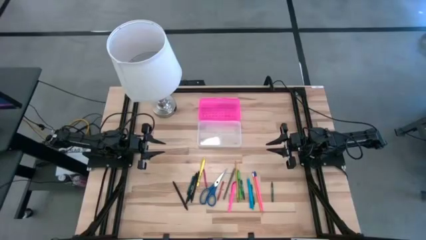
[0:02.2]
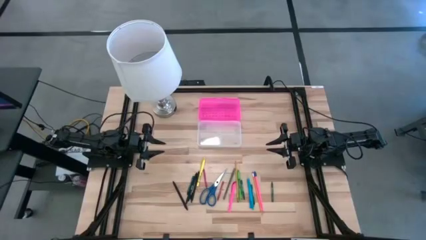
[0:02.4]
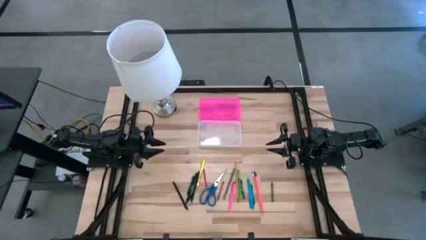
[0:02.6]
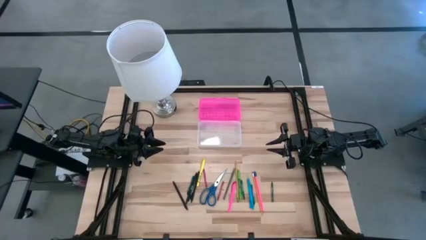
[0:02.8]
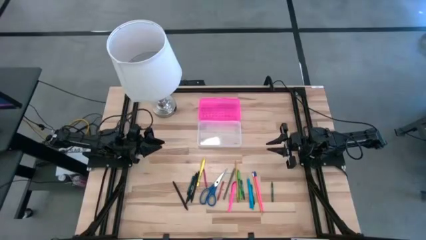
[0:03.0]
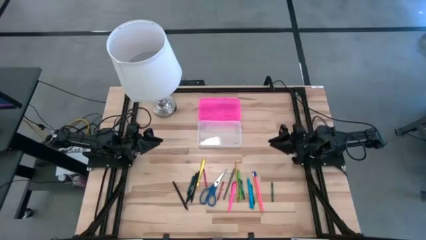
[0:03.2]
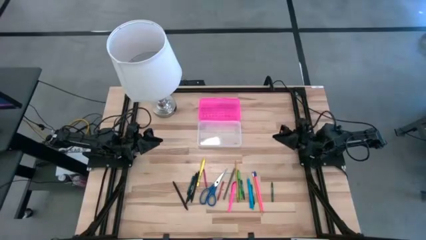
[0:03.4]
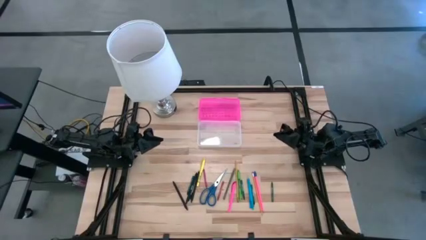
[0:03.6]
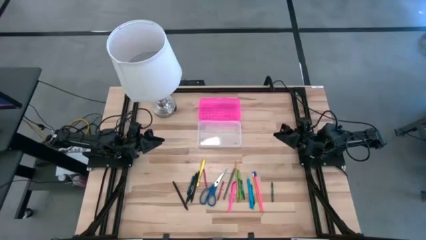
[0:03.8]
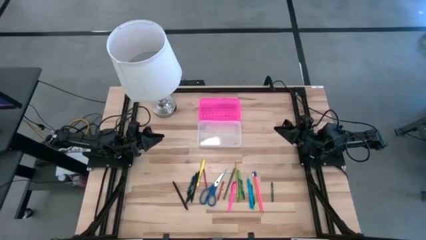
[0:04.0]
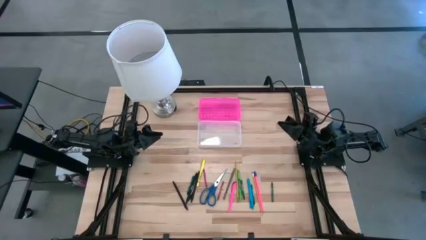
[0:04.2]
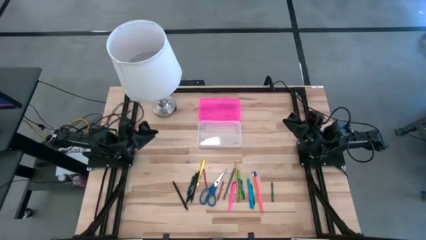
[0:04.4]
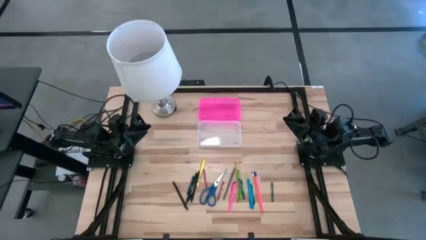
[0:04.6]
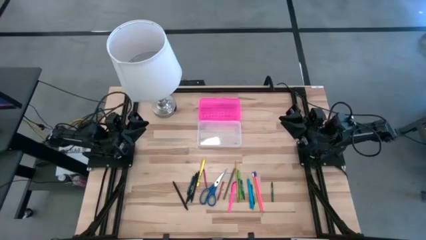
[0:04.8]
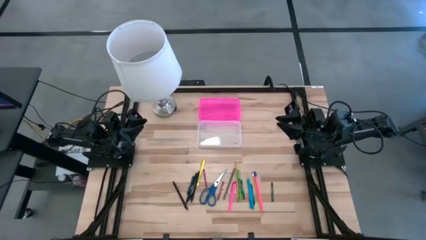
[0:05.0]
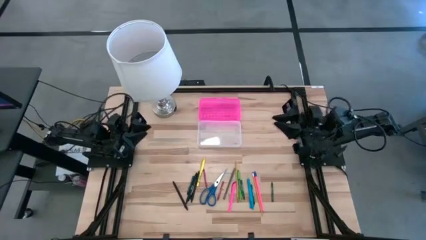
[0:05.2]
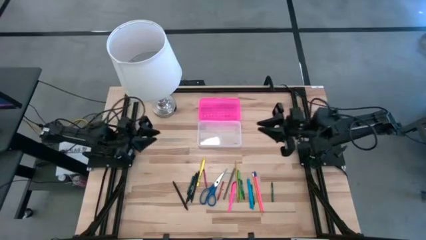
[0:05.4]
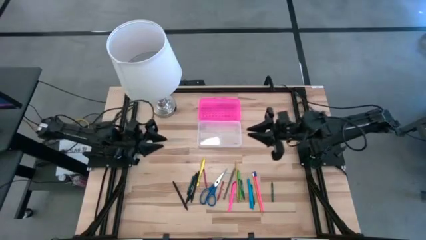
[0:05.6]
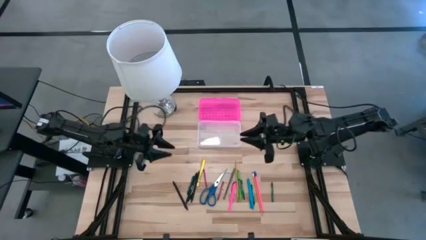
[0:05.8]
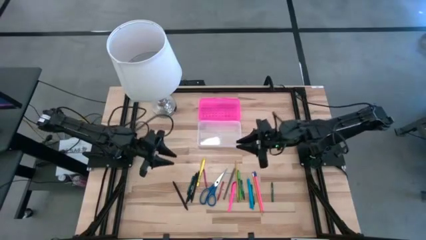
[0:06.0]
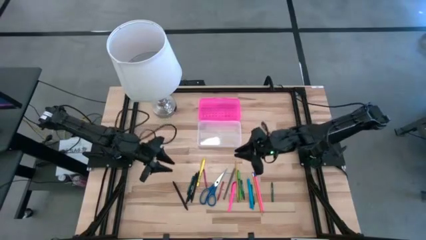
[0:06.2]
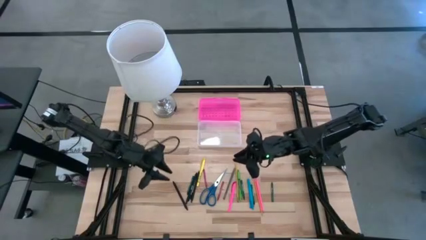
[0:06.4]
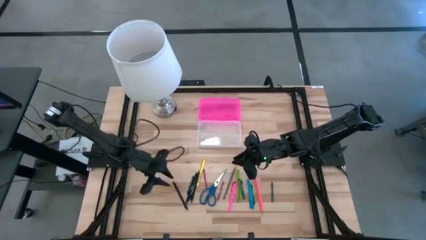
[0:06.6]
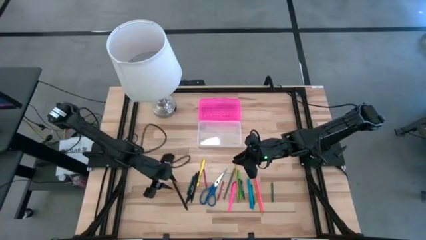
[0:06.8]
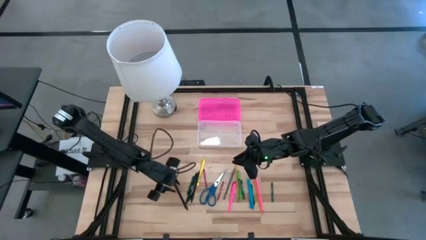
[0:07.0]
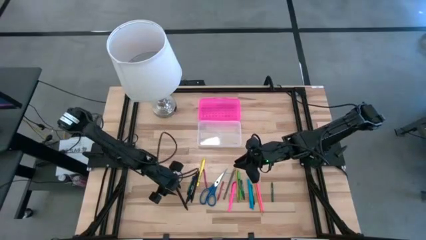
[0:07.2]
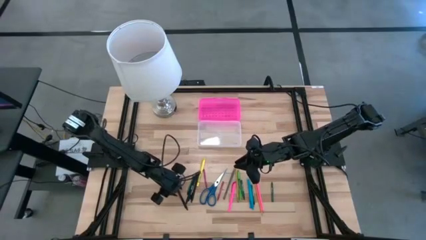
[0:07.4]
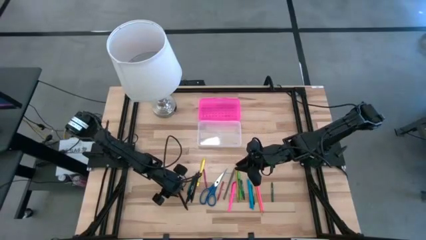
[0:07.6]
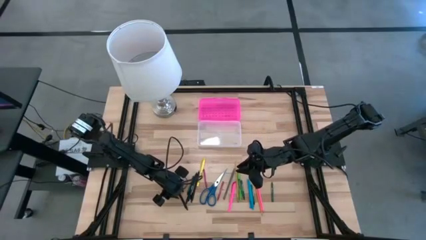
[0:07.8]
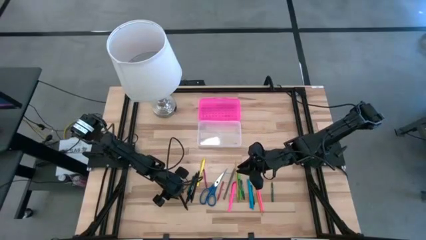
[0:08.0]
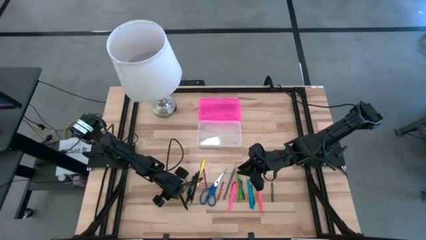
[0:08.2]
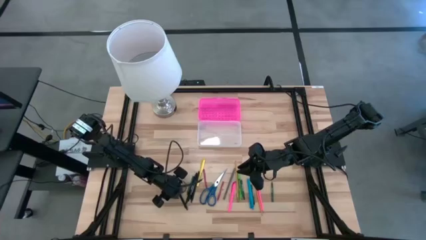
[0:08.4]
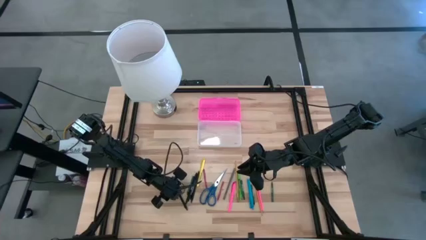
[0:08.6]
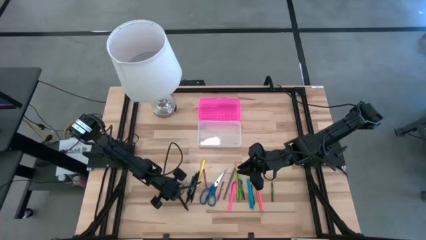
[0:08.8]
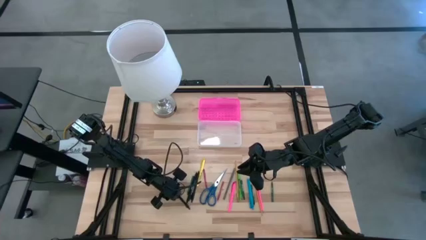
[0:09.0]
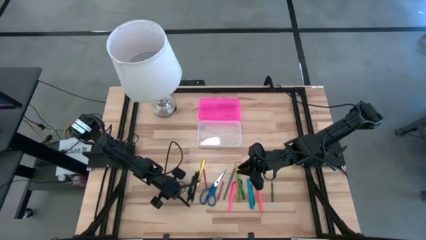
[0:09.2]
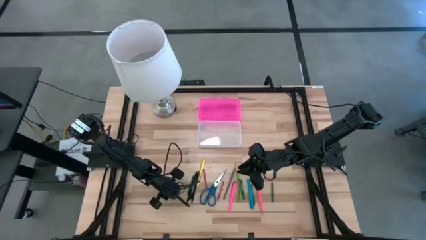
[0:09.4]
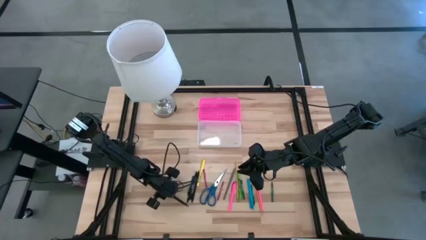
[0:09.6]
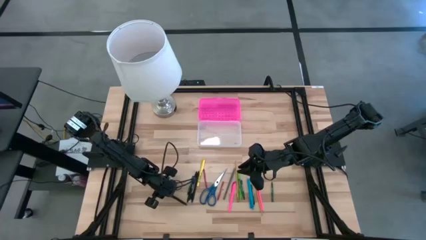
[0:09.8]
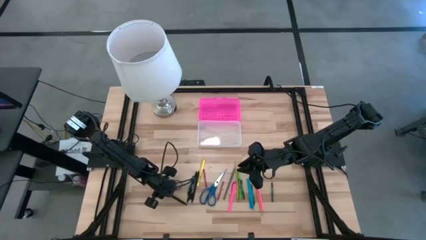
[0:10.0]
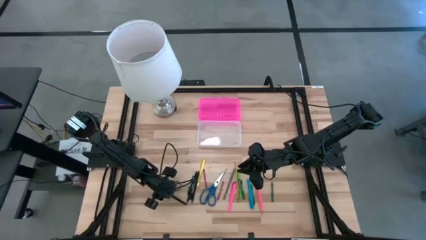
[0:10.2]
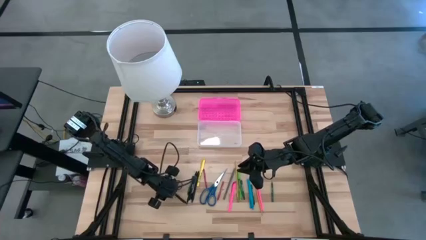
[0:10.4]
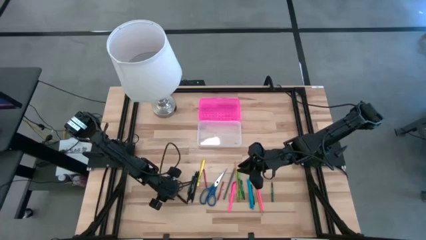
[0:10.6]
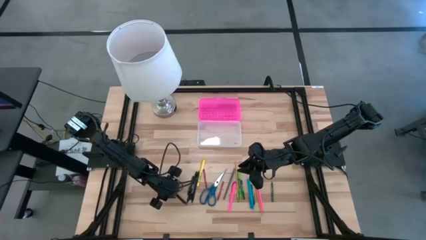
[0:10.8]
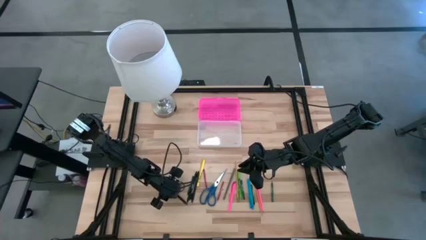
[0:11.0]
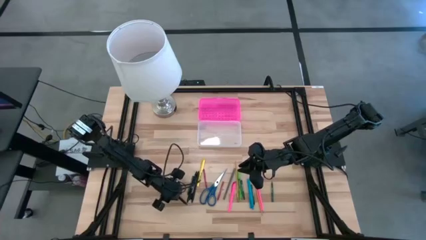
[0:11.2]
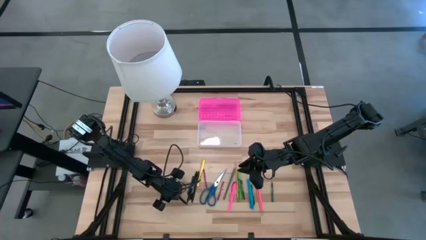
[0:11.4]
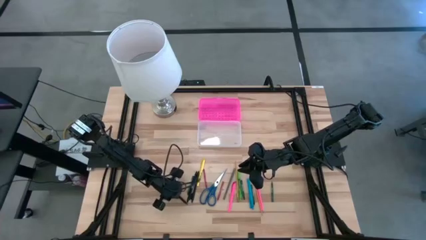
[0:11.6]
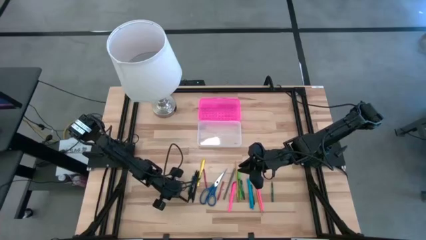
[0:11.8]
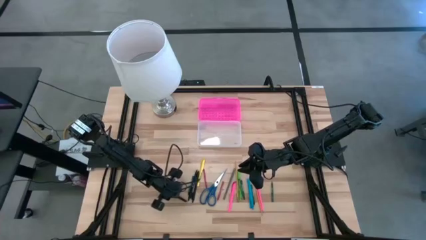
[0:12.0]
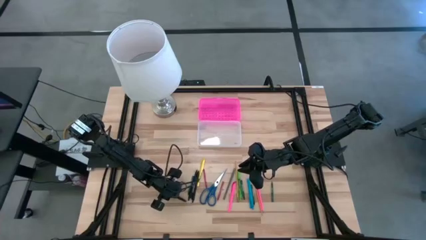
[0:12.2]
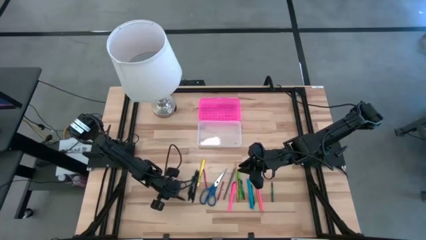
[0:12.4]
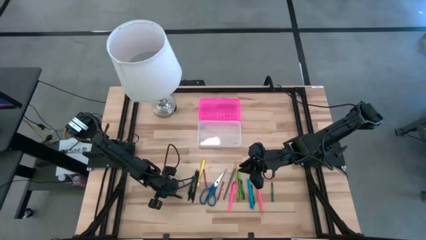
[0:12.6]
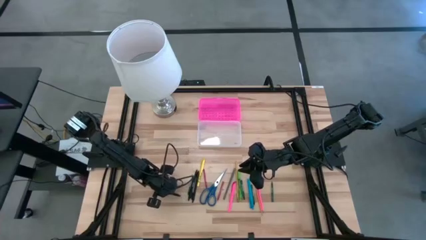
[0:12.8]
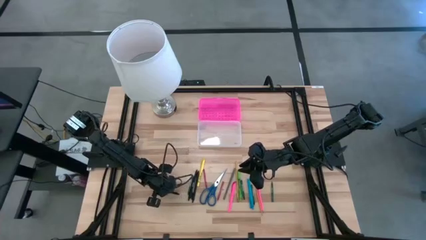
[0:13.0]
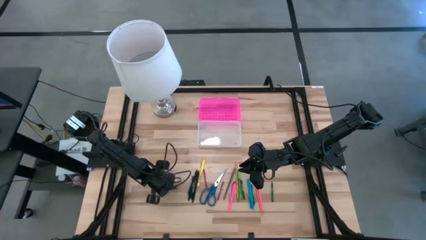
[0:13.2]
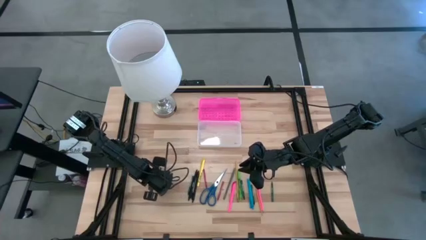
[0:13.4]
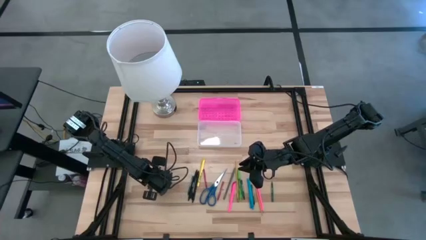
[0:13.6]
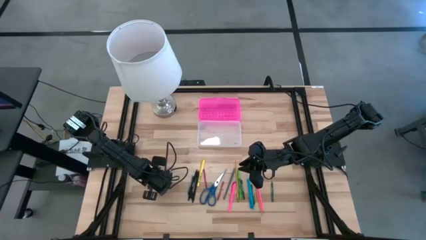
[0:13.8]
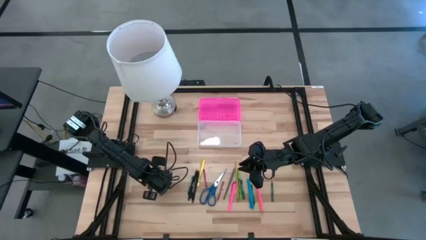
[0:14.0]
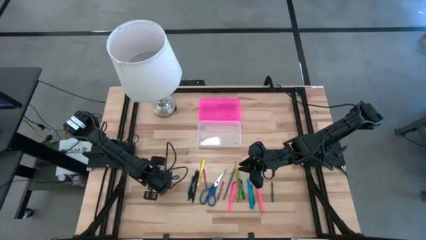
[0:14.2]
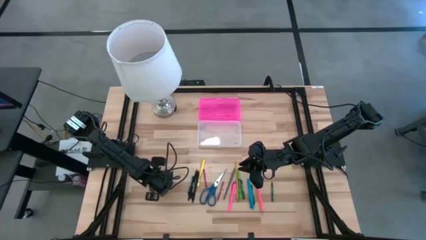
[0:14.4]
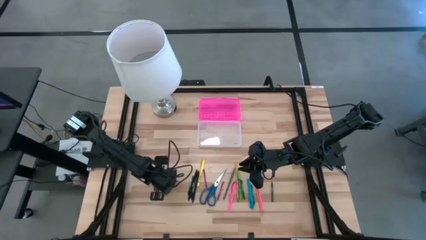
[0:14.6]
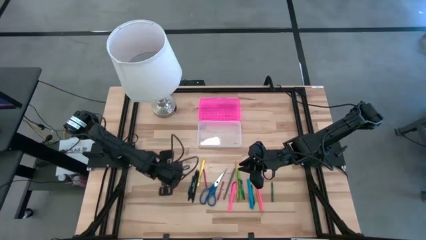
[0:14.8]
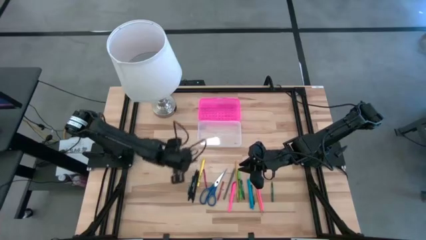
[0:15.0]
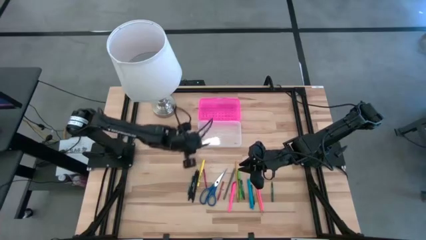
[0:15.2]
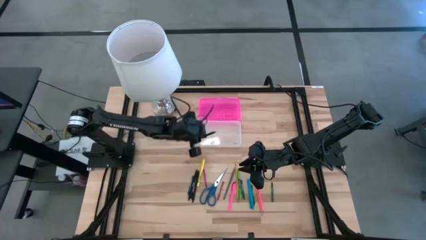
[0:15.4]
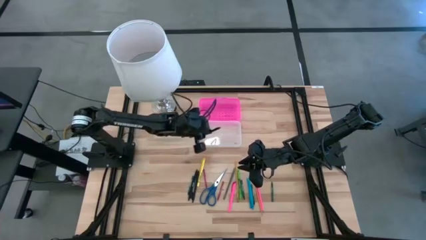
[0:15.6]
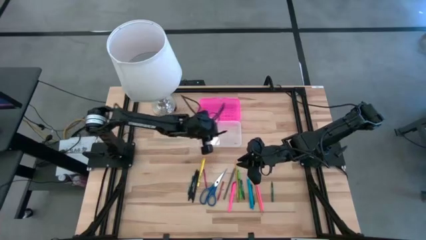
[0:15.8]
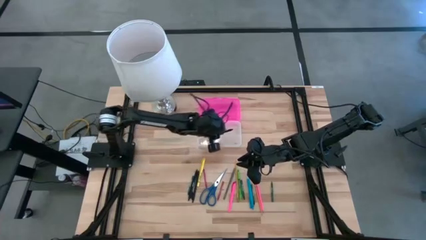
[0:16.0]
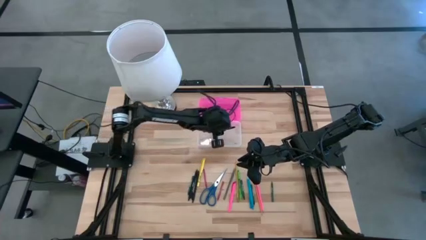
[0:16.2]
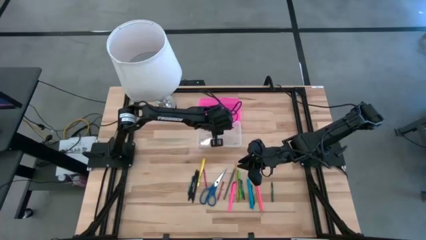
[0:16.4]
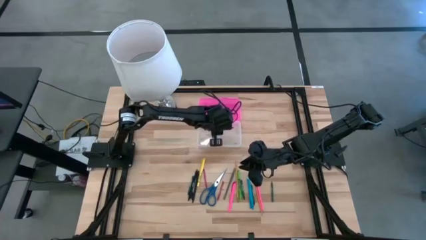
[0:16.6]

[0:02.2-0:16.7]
Task: Pick & place school supplies into a supply box
Put the left black pen into the pink supply box
